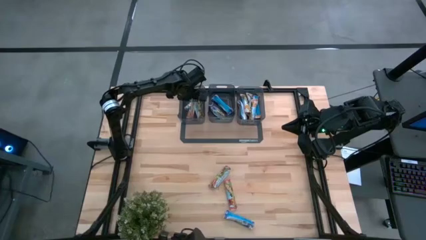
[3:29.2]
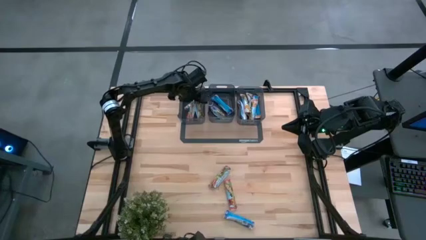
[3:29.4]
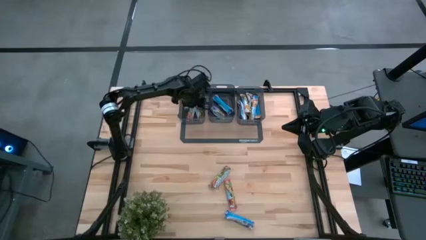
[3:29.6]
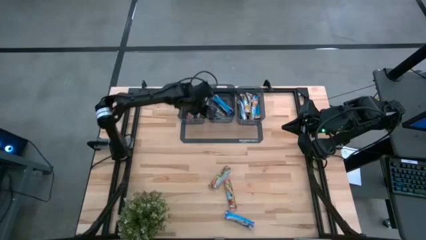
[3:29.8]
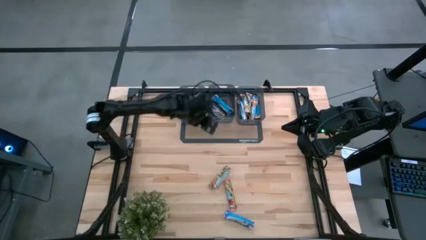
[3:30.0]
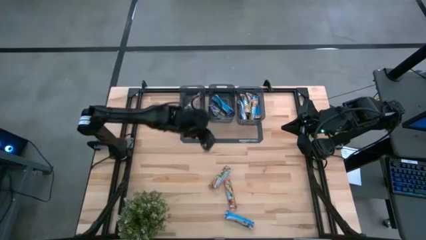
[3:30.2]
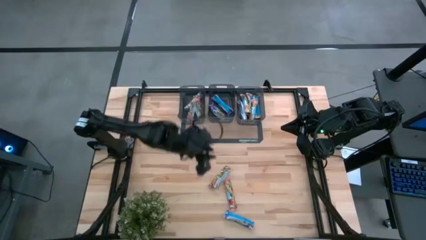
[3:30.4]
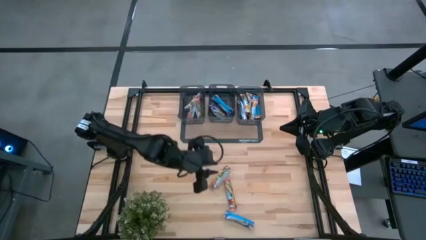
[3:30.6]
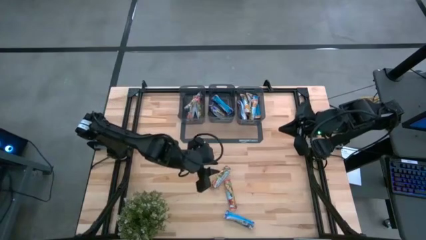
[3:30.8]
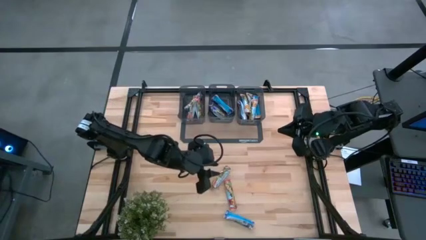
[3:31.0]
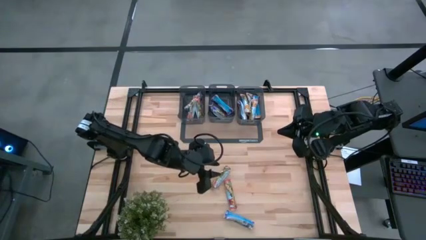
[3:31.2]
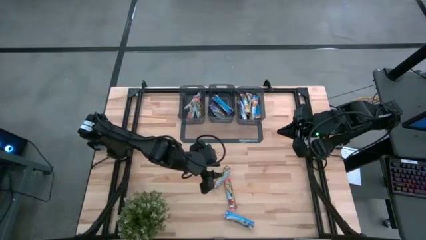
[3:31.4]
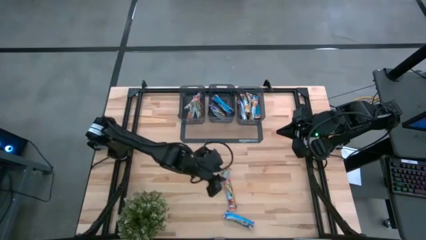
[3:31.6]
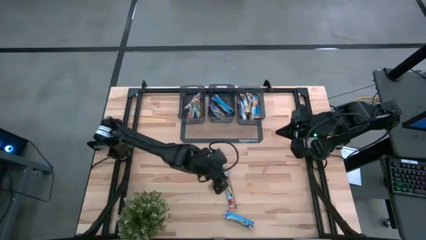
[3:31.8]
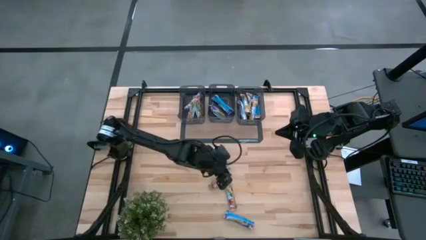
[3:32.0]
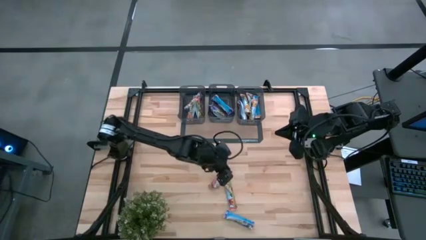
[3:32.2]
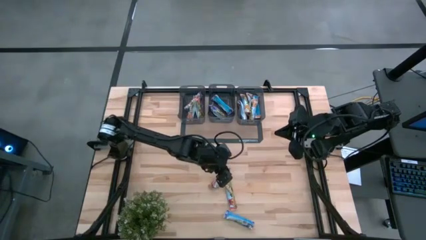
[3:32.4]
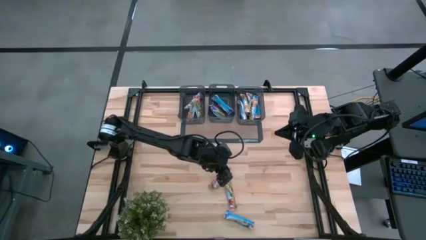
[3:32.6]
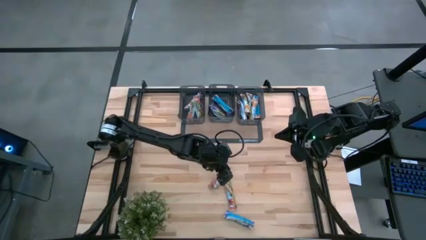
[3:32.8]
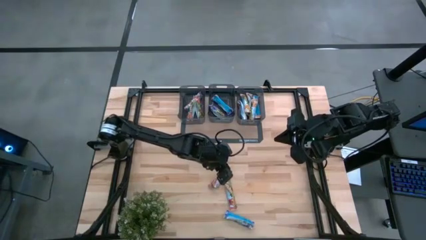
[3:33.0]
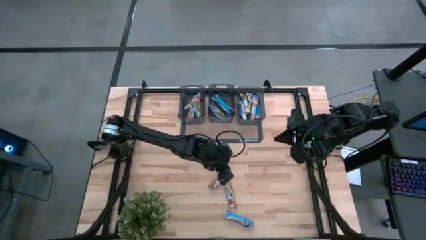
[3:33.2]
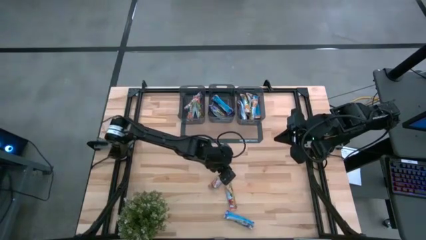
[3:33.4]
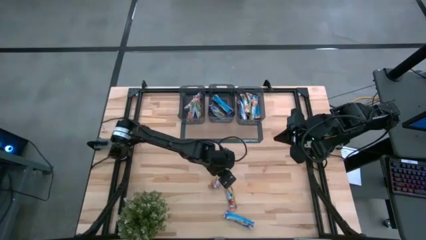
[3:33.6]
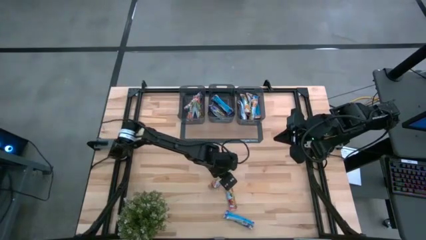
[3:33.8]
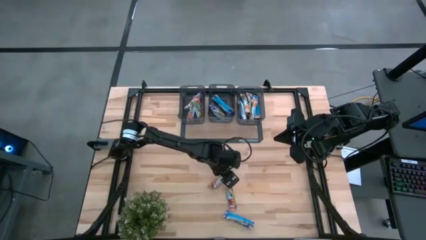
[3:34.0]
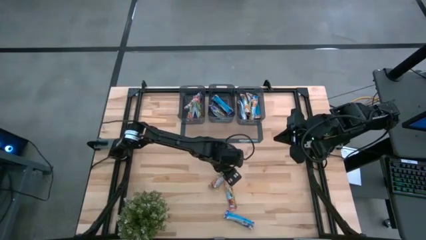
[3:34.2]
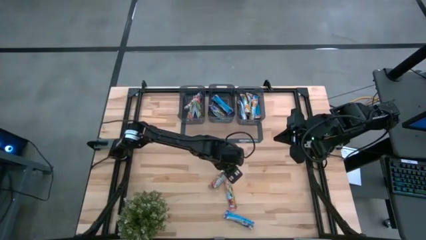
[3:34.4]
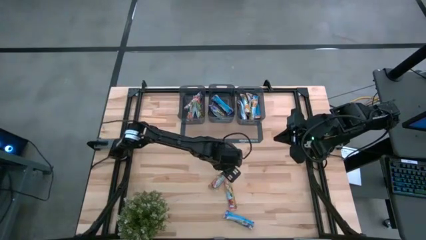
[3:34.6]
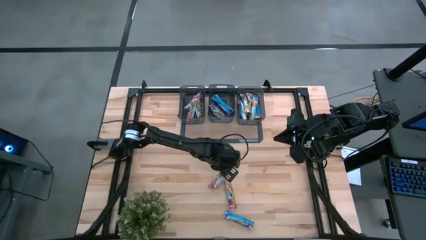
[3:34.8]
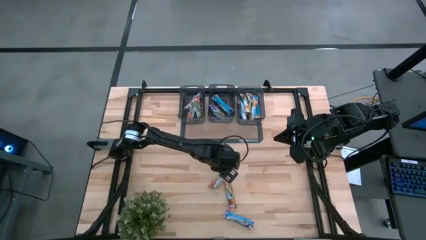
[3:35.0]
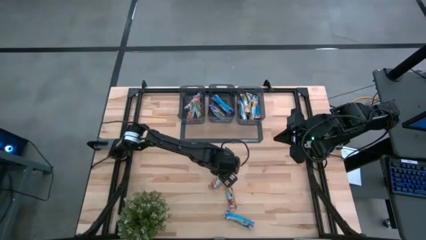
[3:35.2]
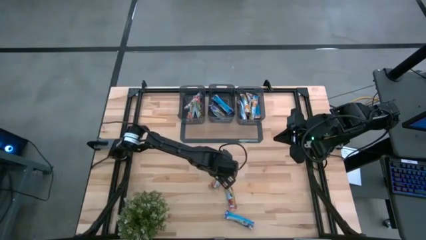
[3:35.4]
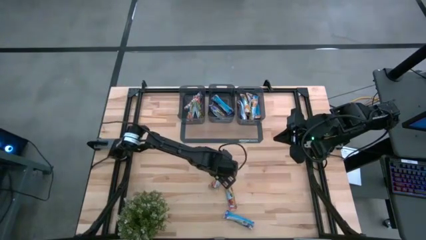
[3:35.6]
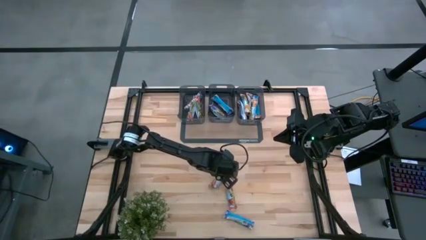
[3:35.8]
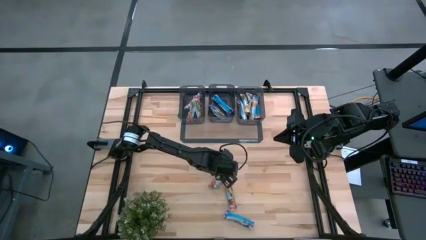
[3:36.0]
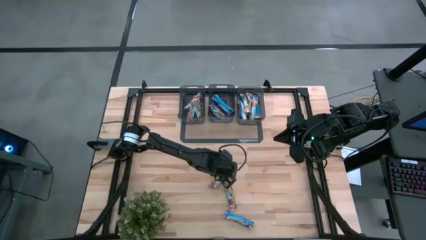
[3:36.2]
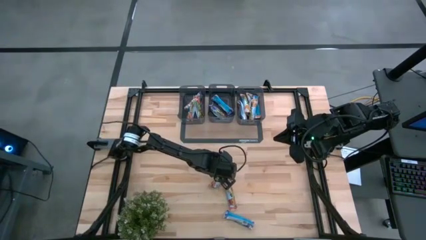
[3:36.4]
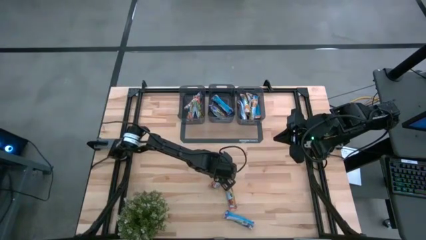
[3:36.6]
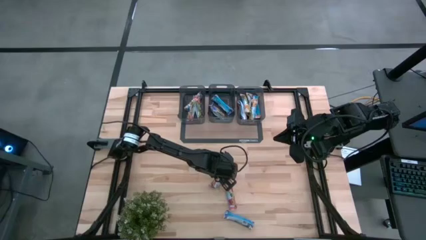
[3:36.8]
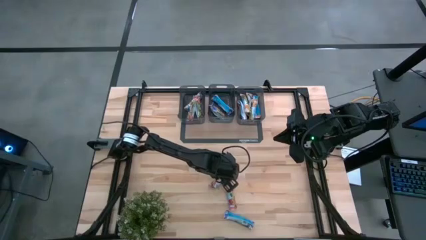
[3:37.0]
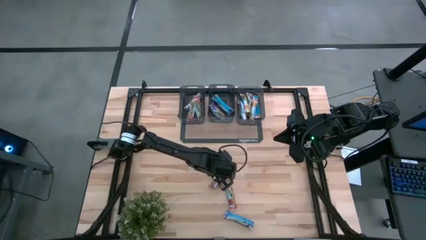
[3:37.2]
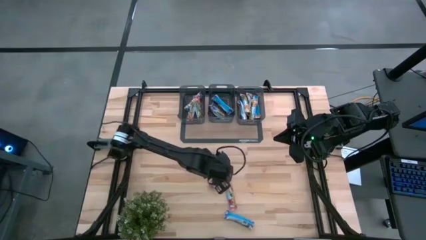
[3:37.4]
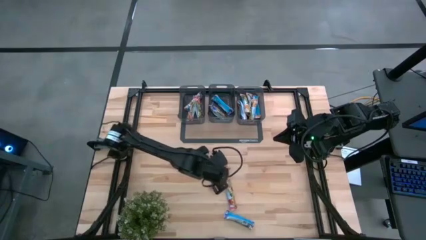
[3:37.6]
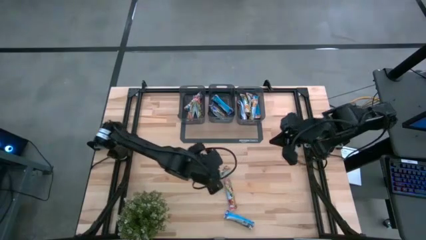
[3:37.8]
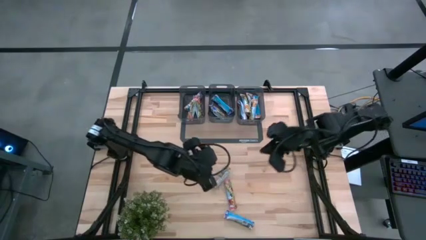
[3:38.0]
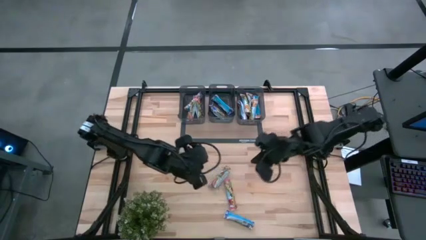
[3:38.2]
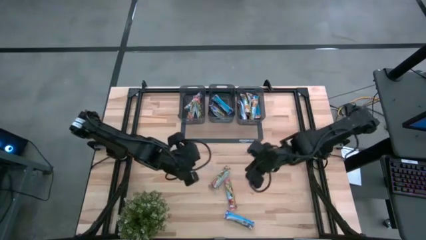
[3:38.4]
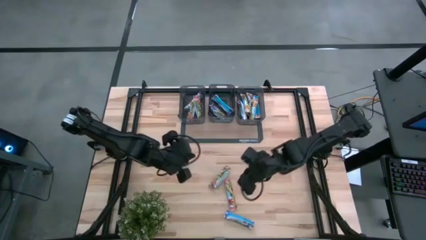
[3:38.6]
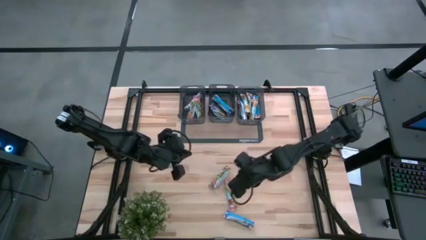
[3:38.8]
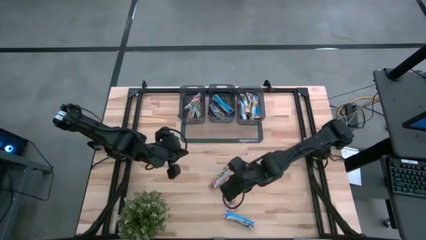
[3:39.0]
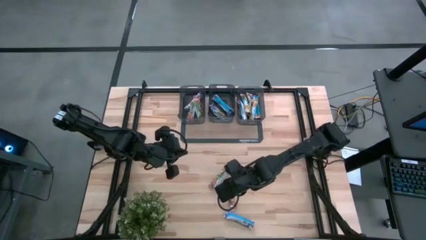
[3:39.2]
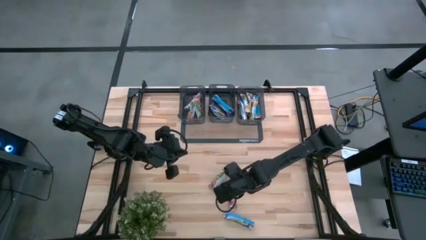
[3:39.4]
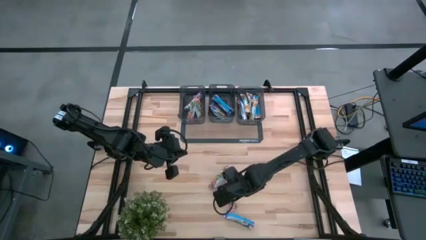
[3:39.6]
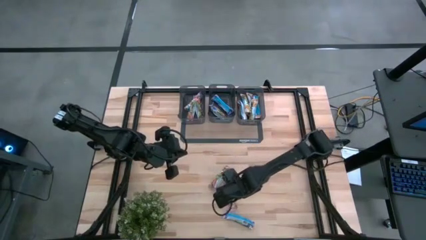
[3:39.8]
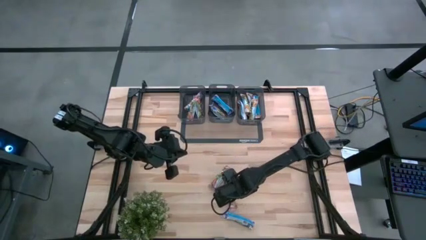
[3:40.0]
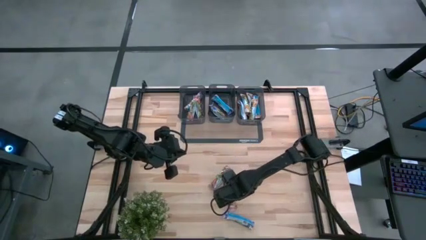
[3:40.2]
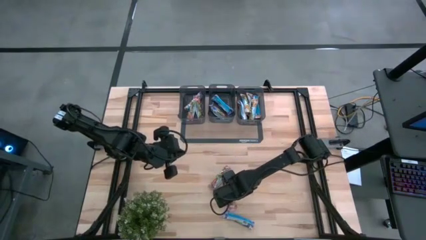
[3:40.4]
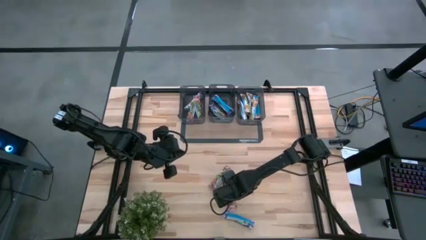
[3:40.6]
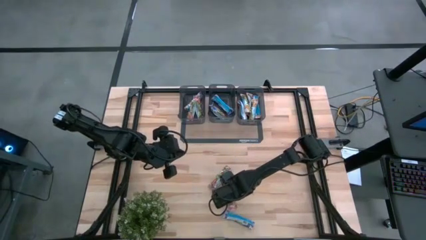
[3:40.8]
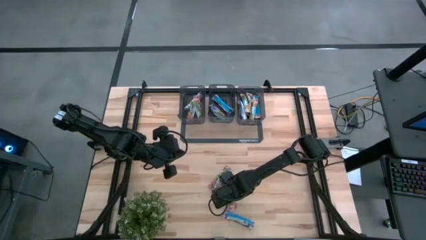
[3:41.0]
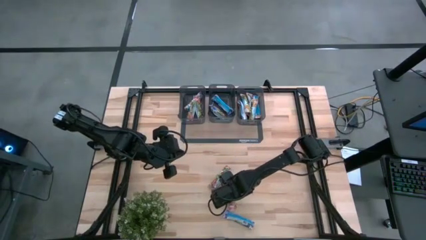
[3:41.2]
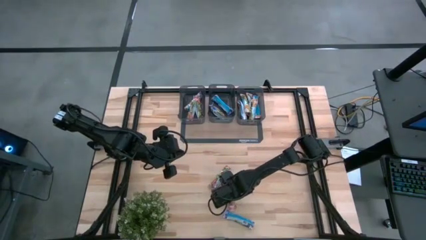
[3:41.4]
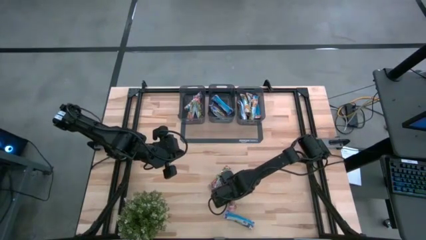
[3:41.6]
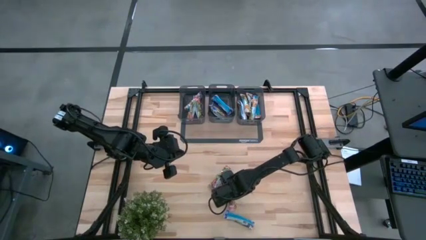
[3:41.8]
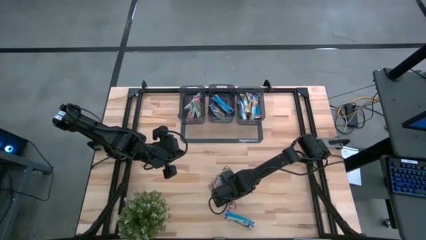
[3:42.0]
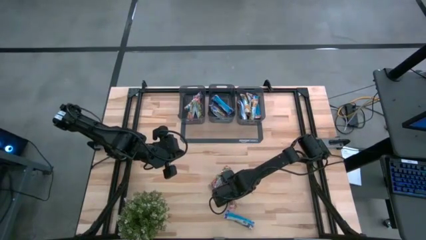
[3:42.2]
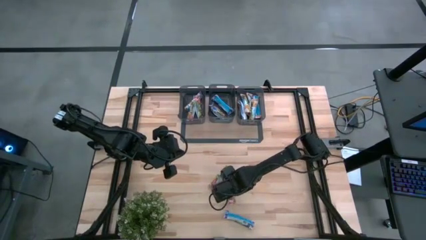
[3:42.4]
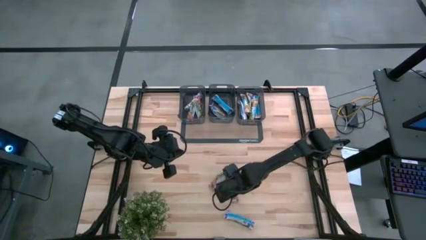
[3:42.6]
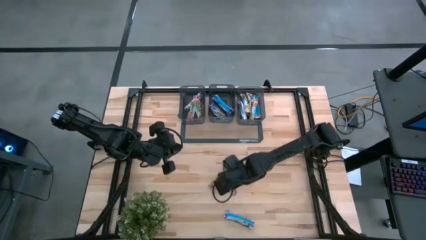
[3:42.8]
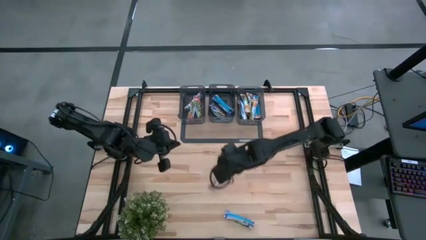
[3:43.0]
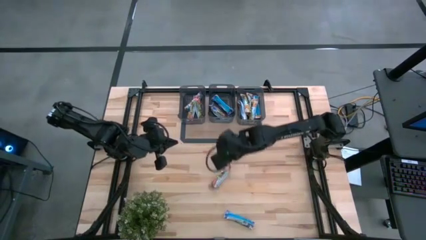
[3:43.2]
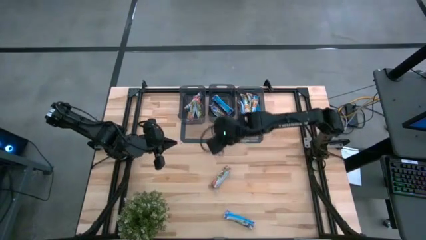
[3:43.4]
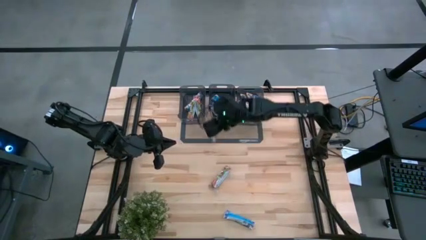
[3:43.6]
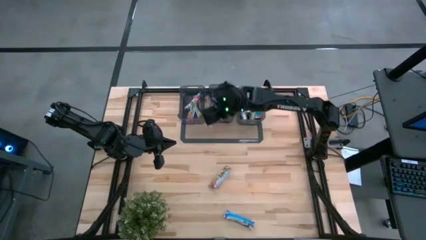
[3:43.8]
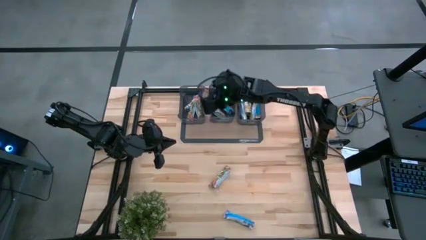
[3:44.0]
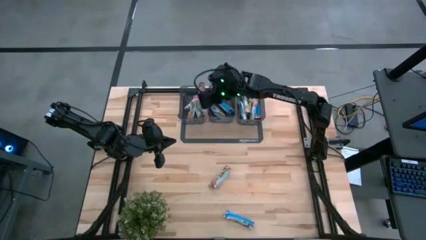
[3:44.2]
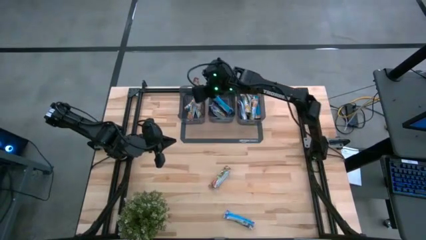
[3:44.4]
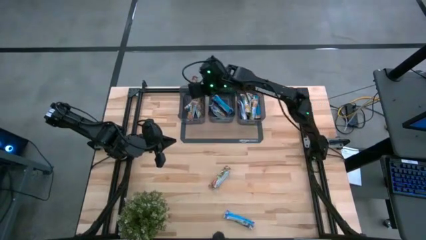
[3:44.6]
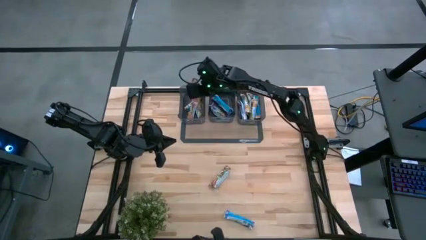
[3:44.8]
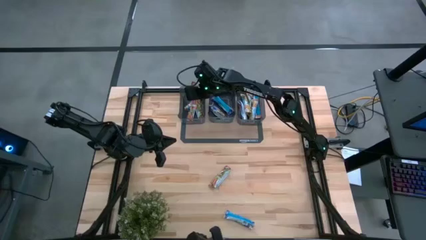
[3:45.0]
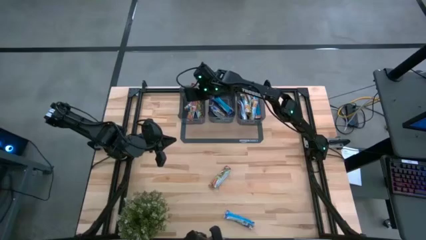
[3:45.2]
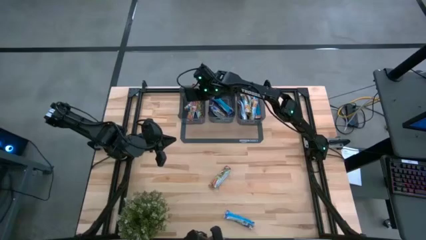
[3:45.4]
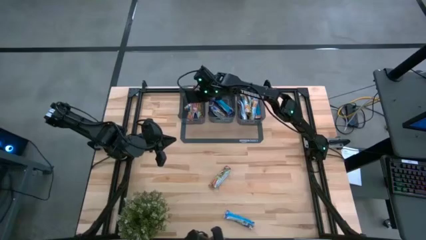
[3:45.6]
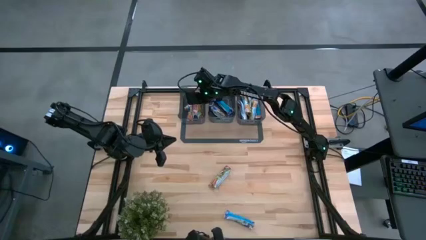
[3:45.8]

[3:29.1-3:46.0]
Task: Pick and place Granola Bars by type
Put the red granola bar into the left black bin
